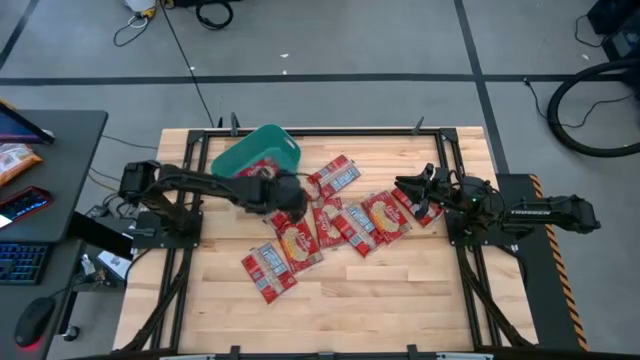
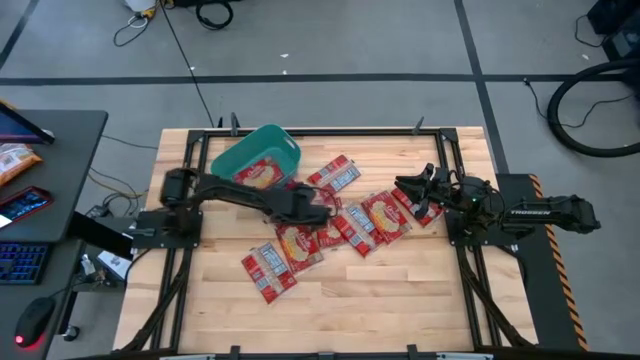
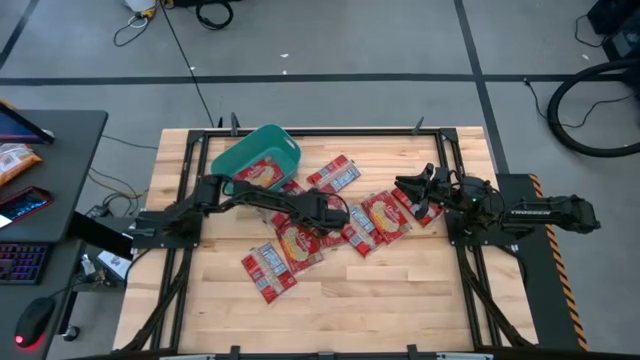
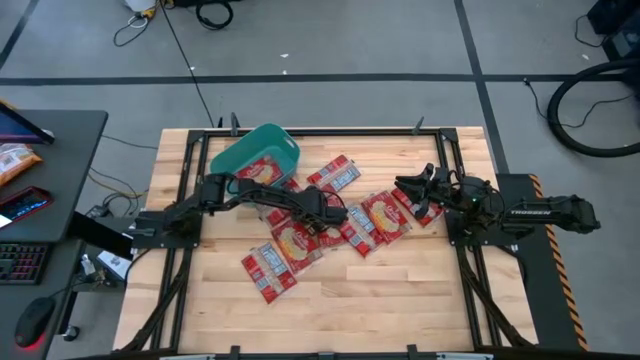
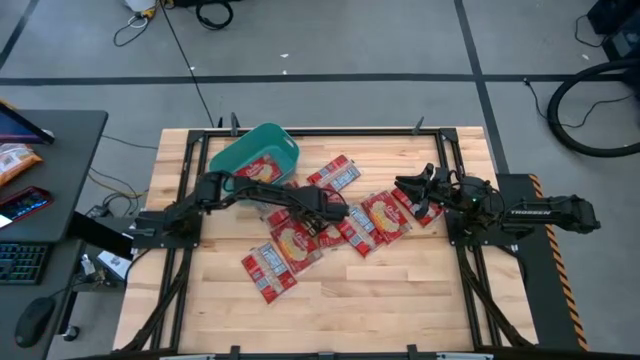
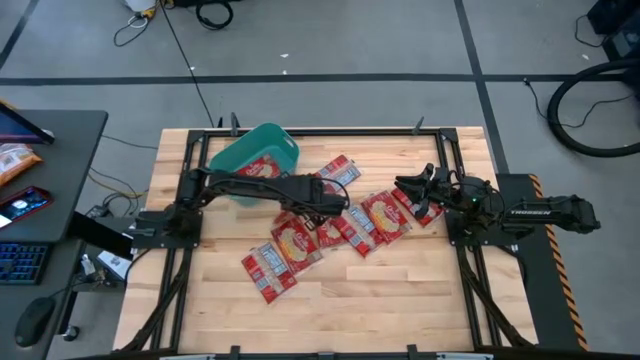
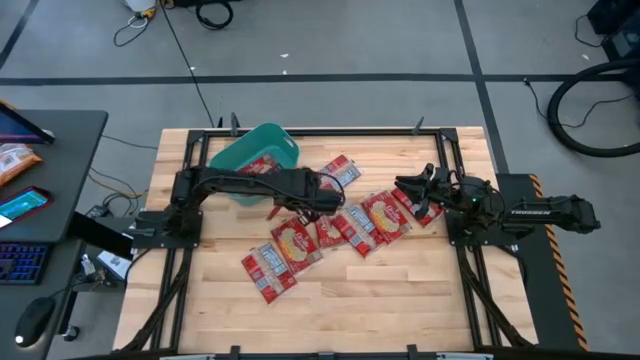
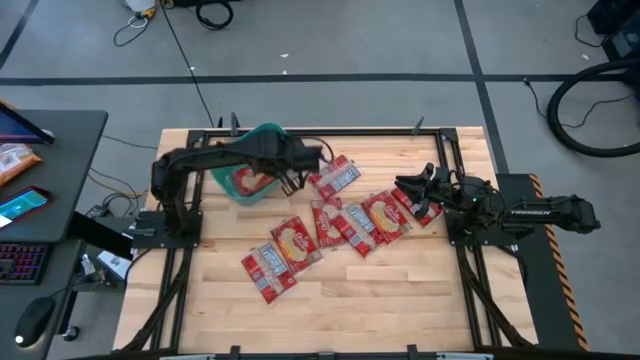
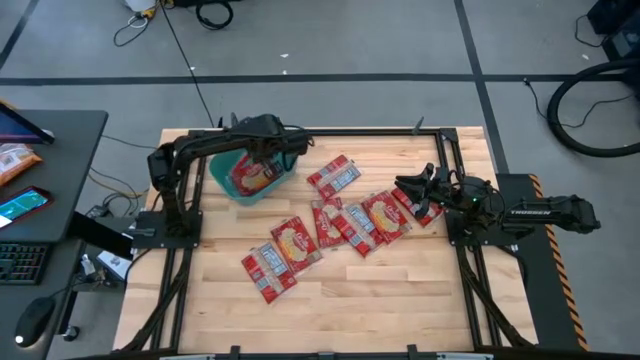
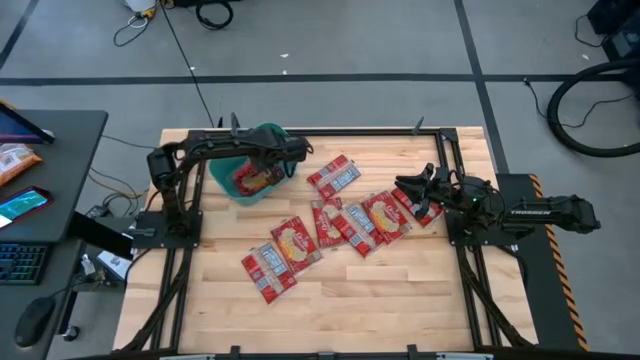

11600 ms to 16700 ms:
Task: Sort popcorn bags into baskets
Put the popcorn bag into the green bin

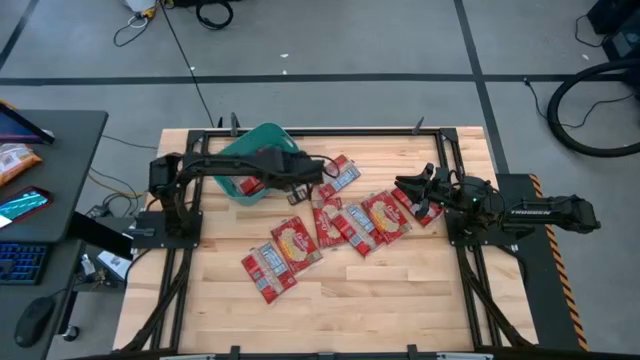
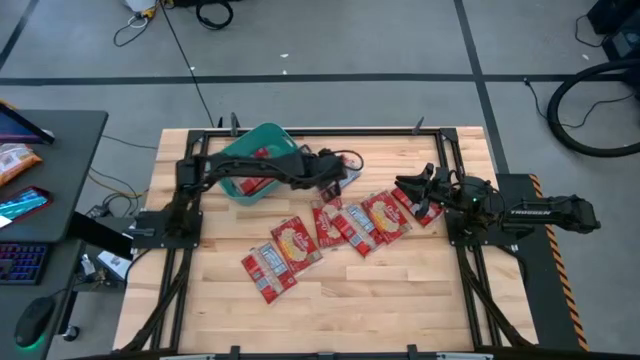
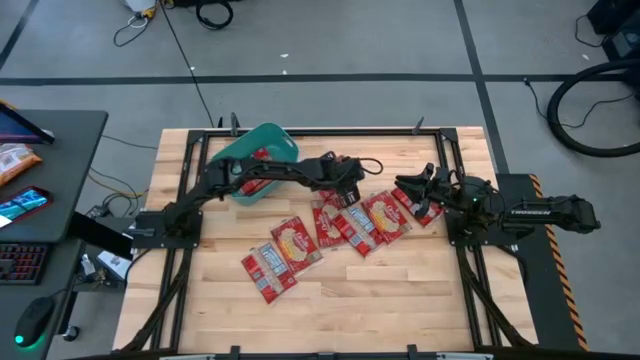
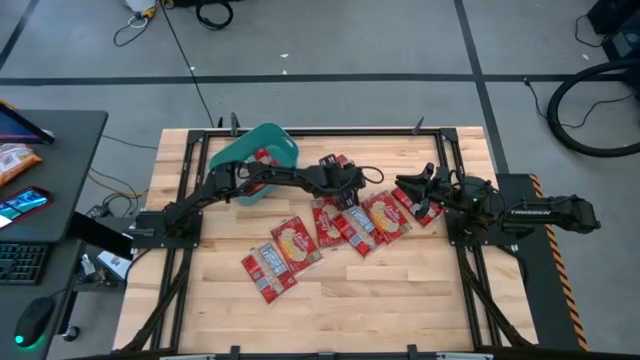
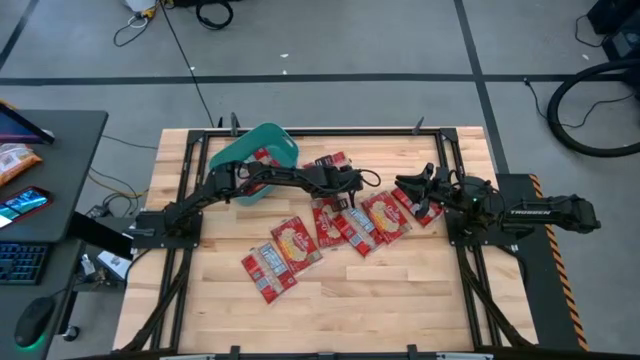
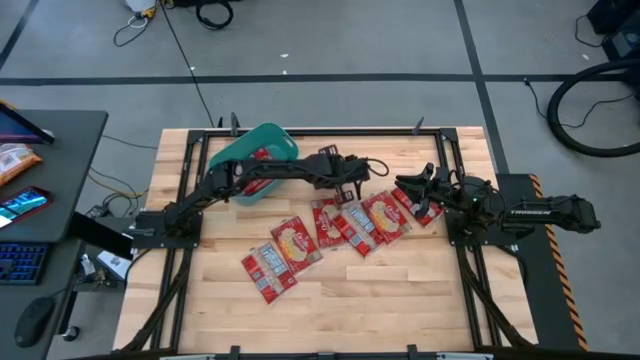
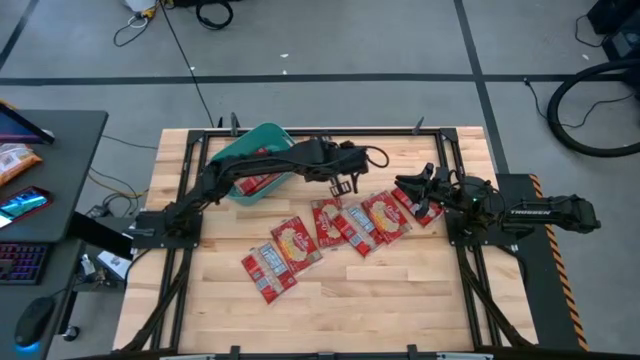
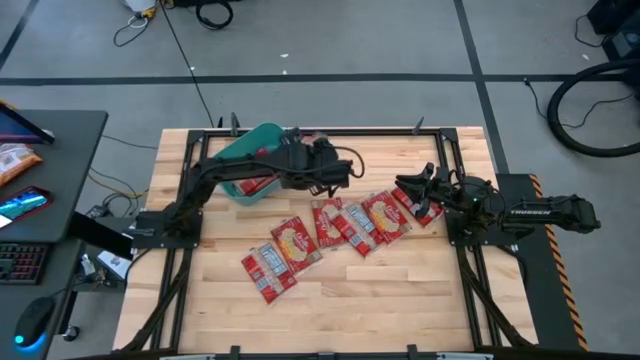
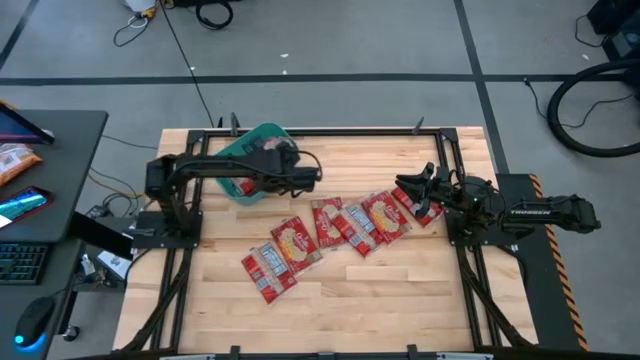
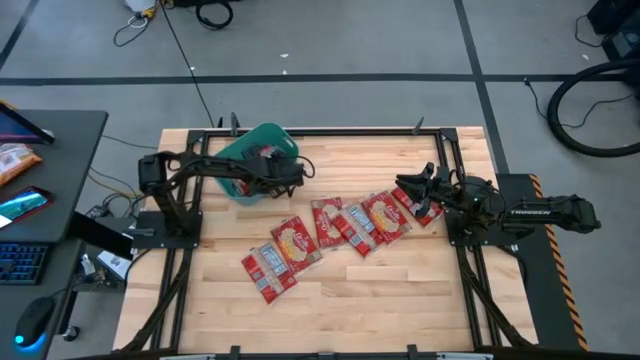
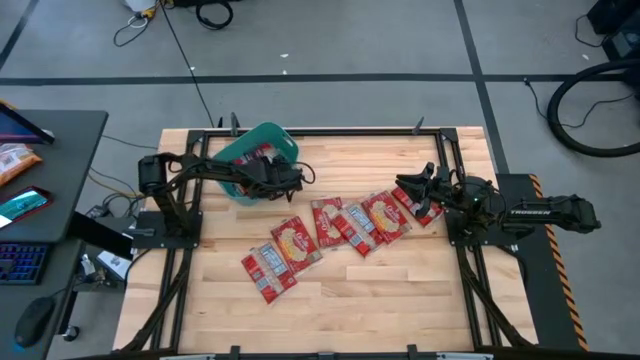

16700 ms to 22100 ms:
Put the popcorn bag into the green bin

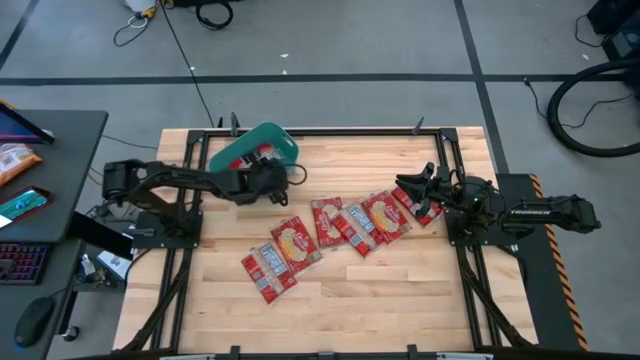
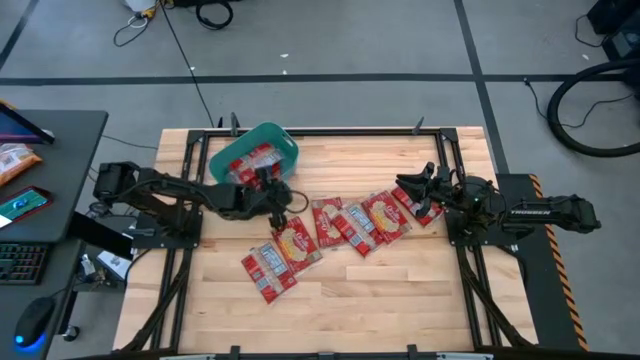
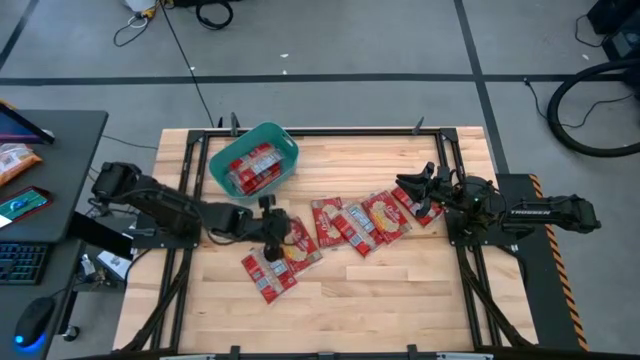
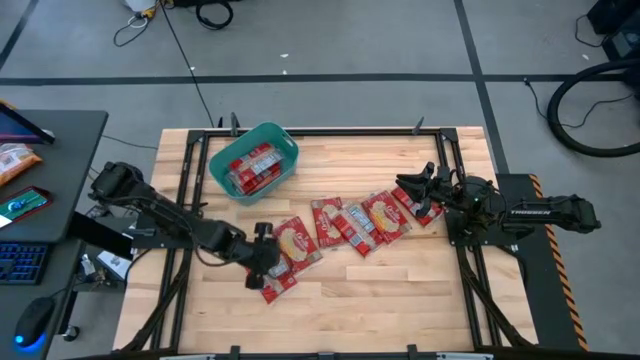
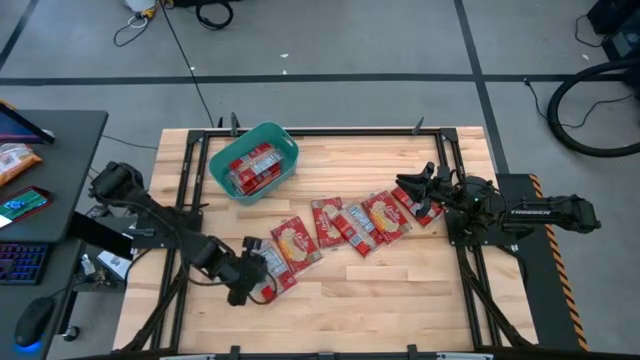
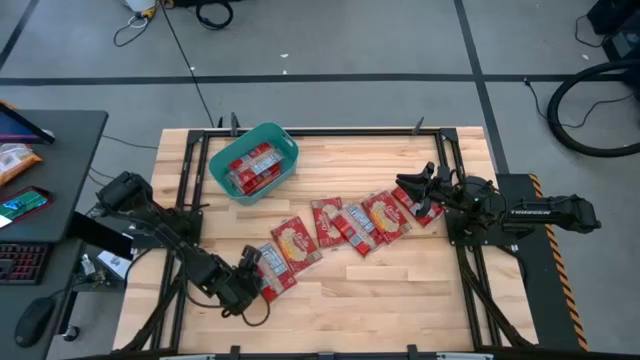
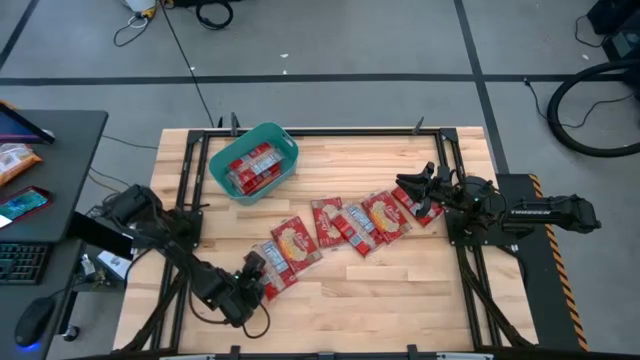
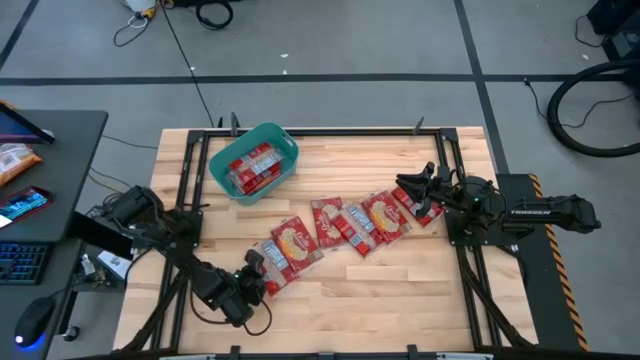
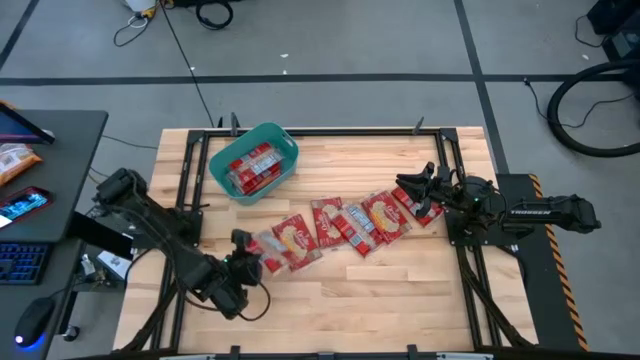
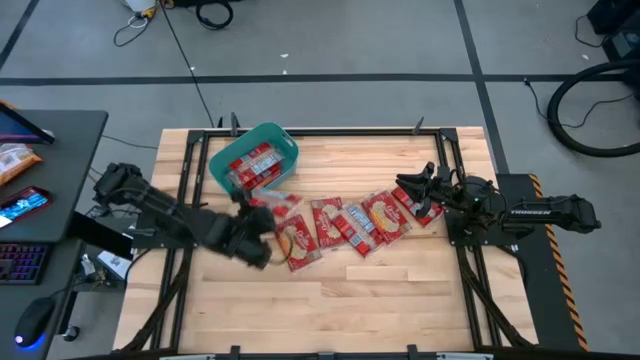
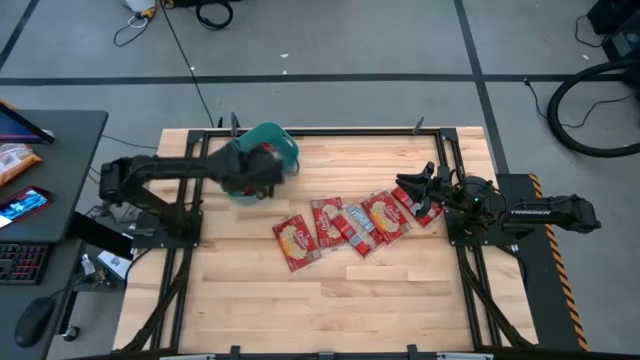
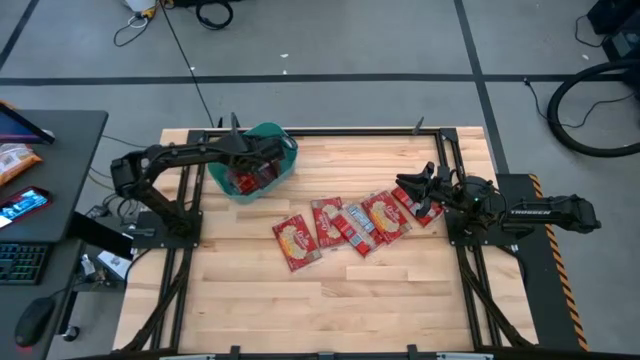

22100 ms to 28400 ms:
Put the popcorn bag into the green bin

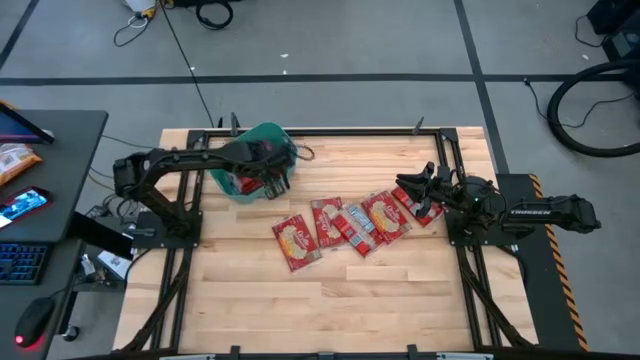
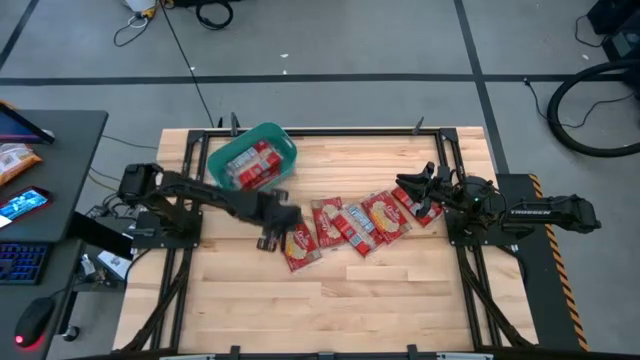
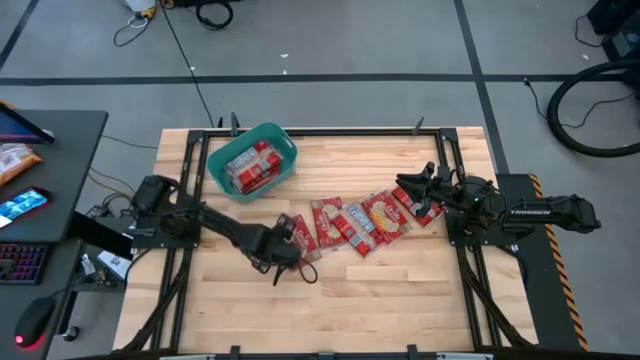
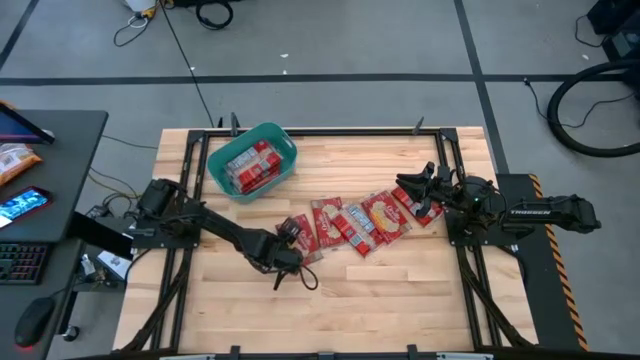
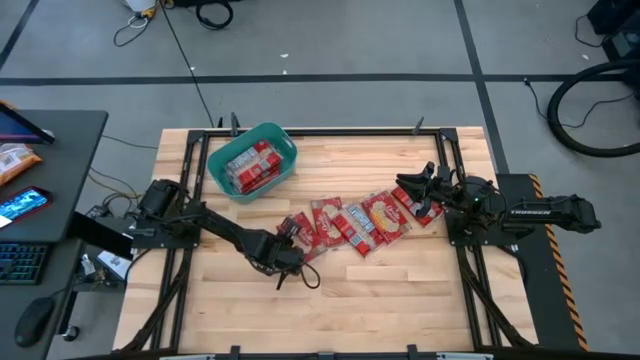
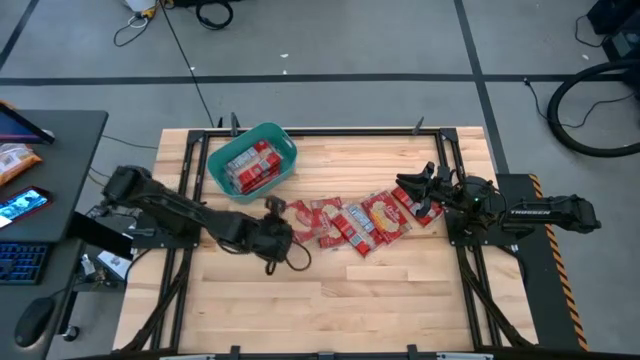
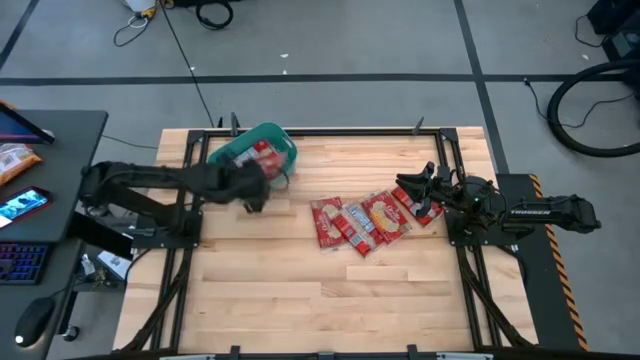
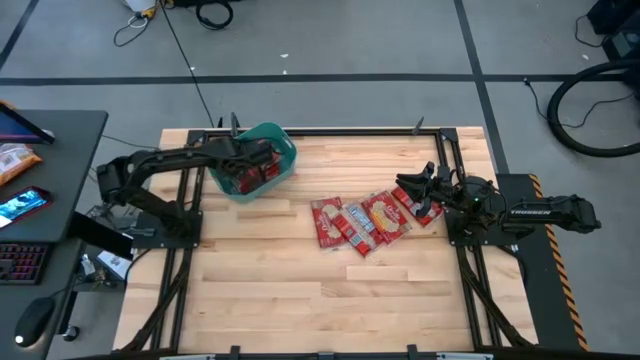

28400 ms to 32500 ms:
Put the popcorn bag into the green bin
